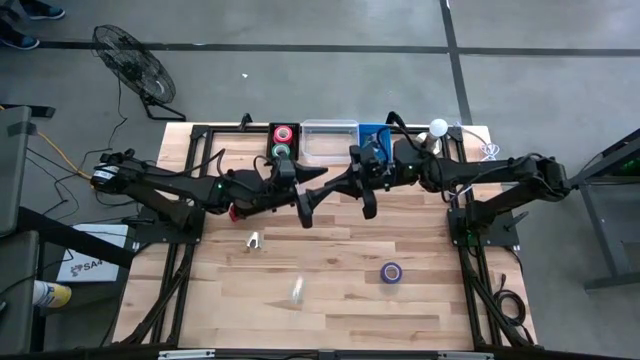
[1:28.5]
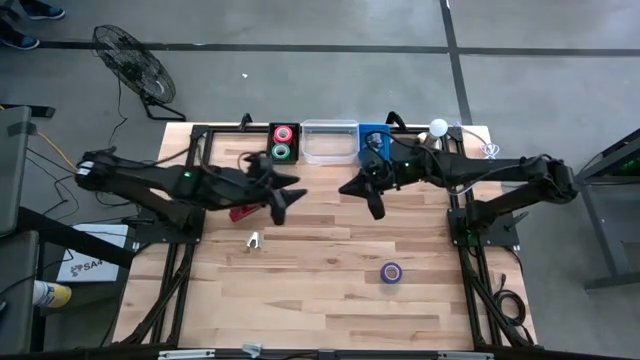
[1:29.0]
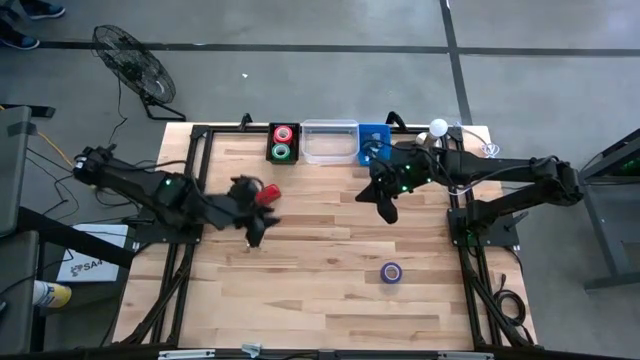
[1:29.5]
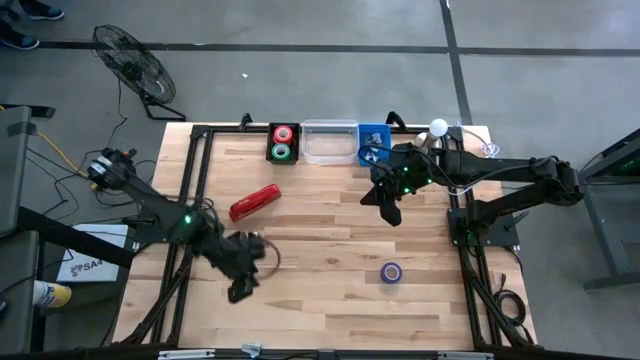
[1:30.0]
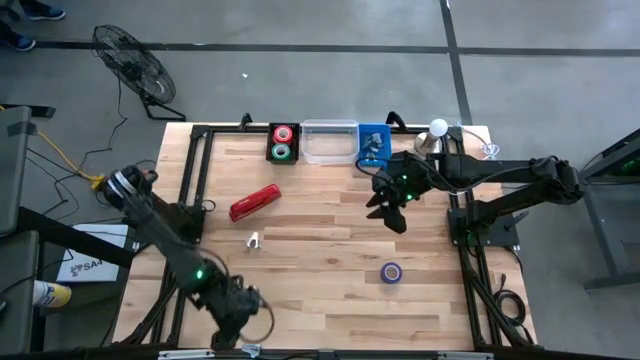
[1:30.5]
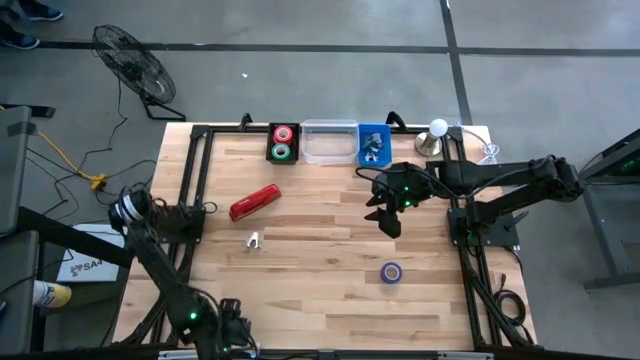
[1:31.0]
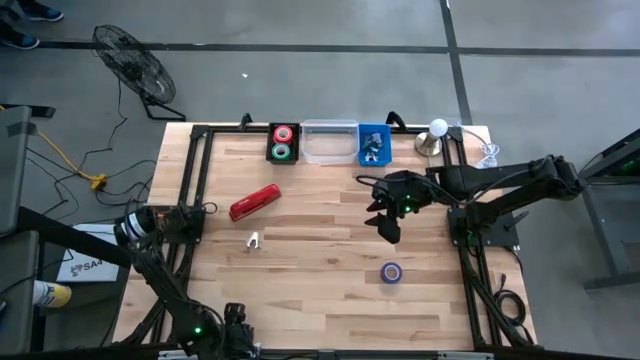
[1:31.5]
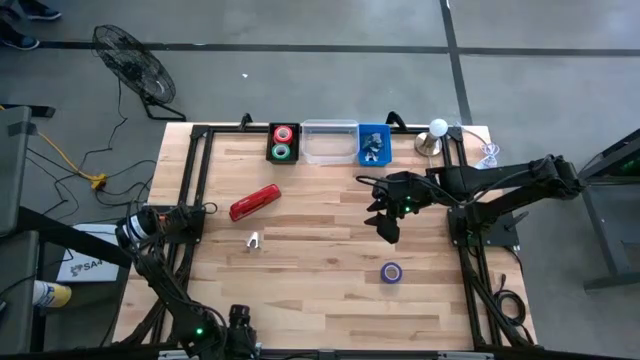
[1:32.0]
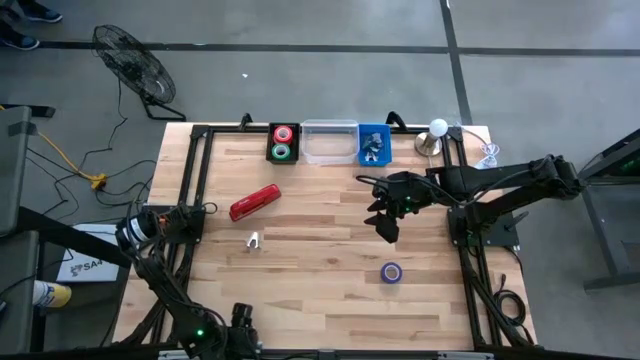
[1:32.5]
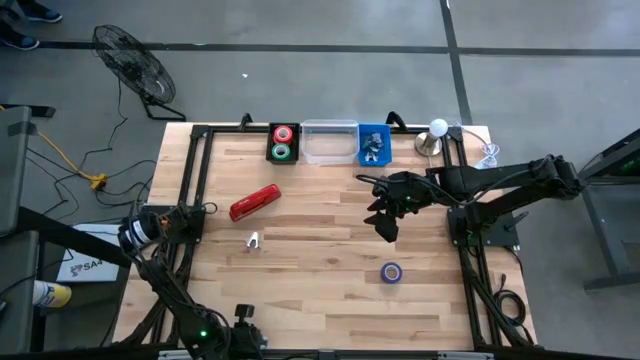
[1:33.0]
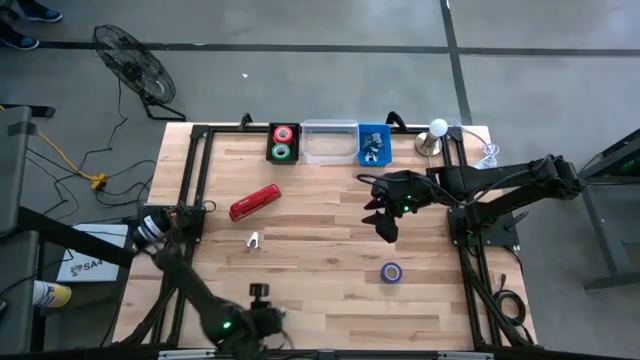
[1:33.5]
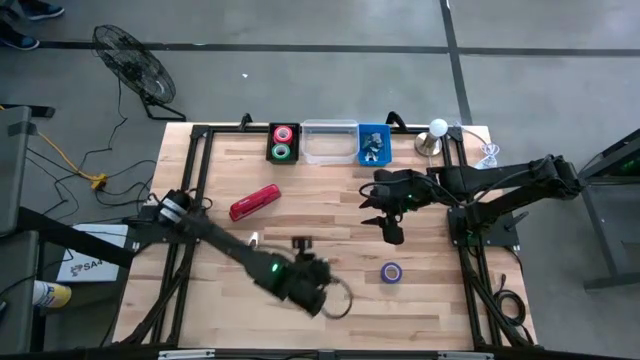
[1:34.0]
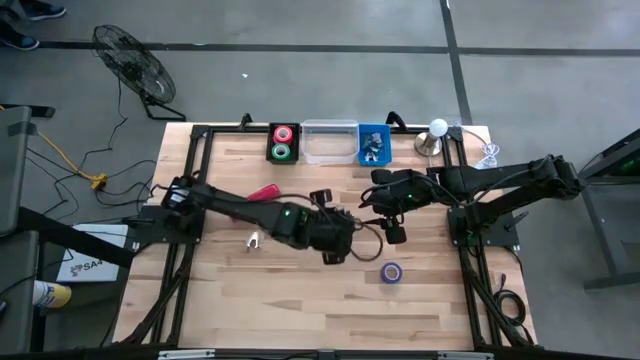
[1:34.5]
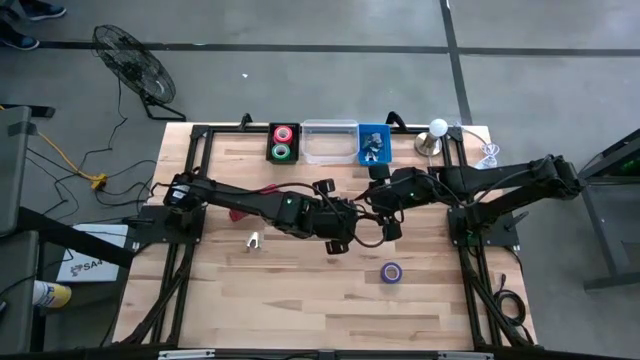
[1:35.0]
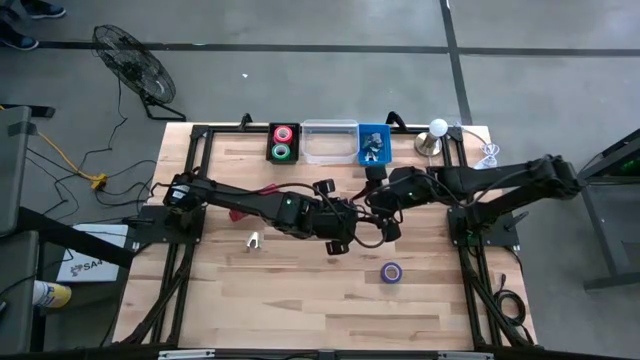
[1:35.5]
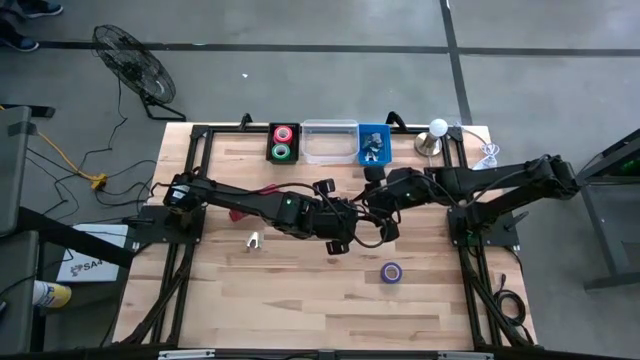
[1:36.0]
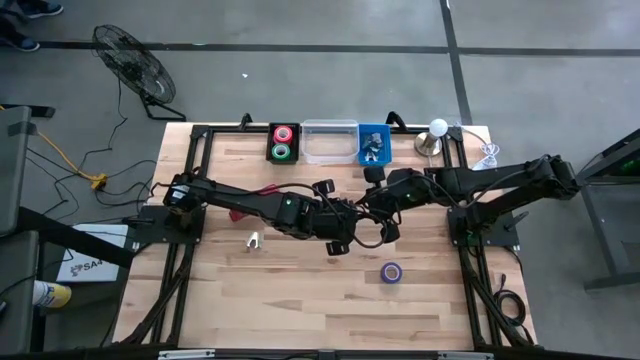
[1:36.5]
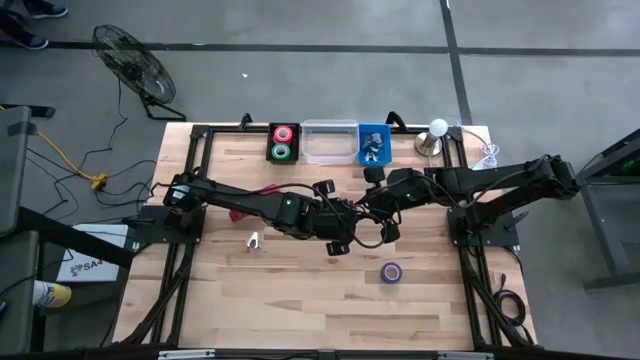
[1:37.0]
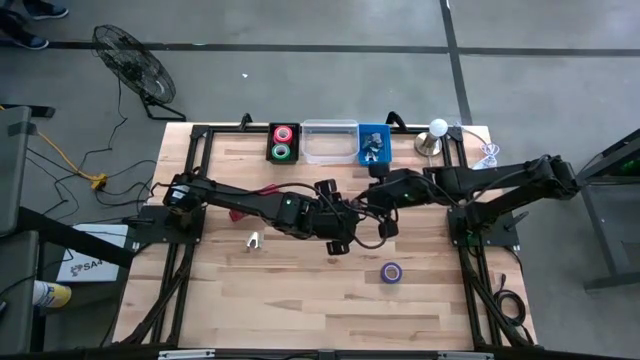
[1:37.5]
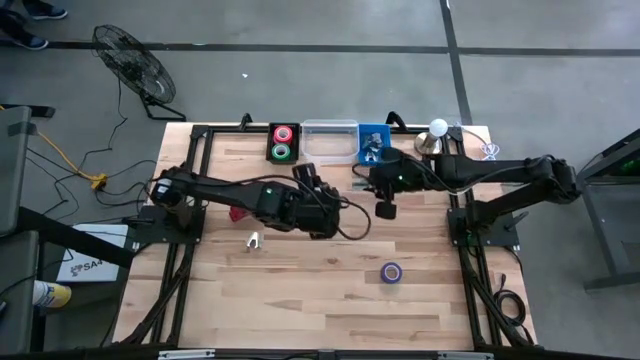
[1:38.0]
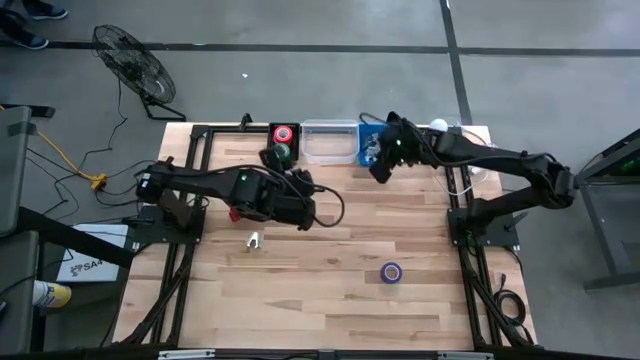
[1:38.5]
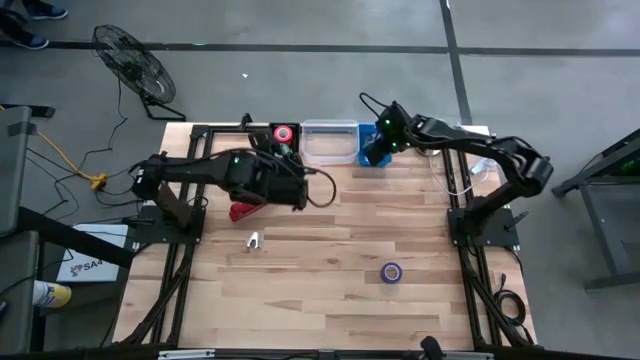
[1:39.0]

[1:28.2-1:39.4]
Task: Pick and place Stapler, Stapler remover, tape
Put the blue staple remover into the blue bin

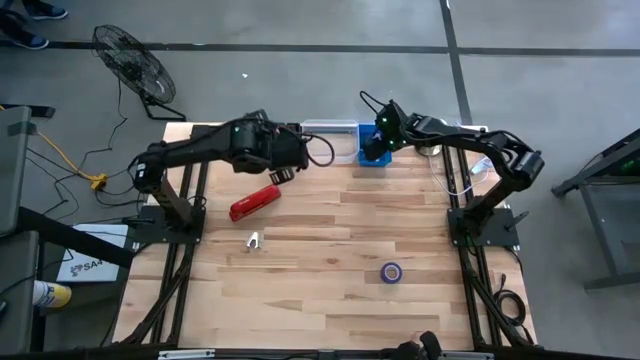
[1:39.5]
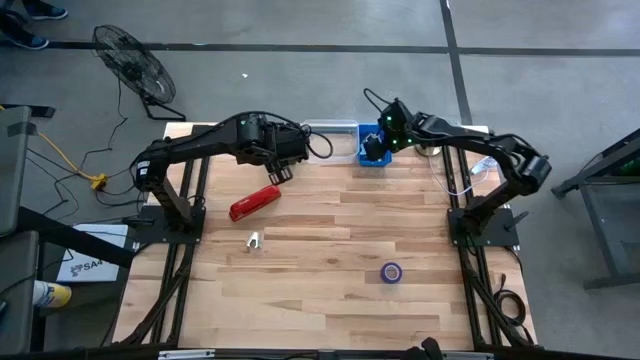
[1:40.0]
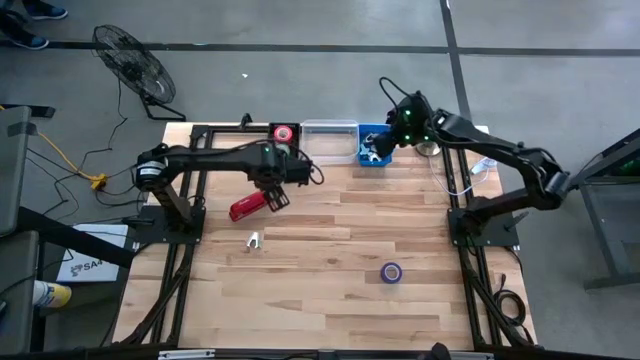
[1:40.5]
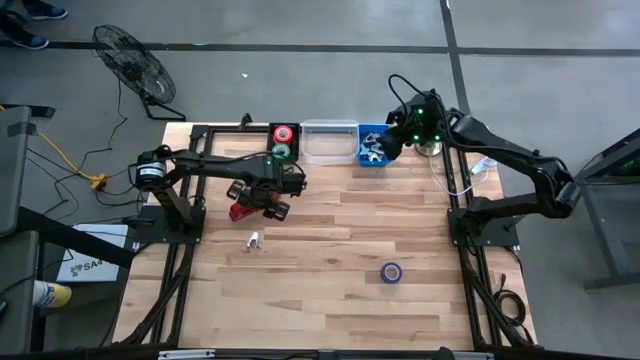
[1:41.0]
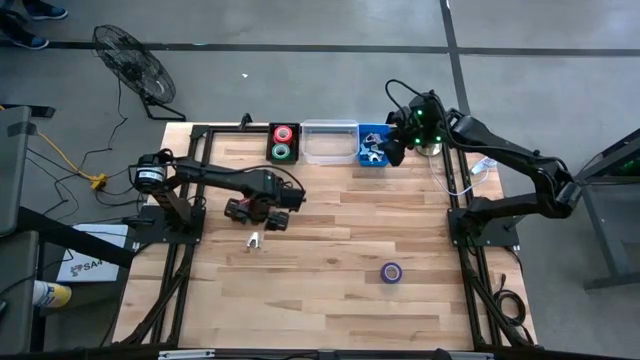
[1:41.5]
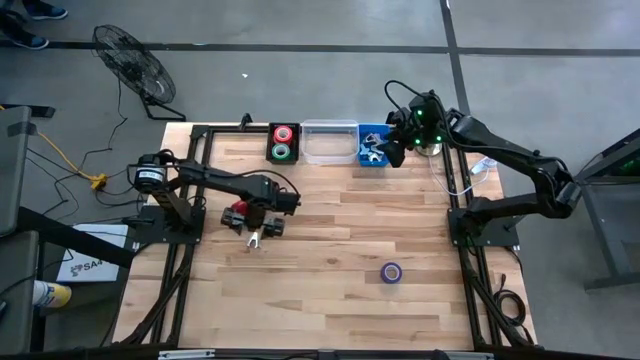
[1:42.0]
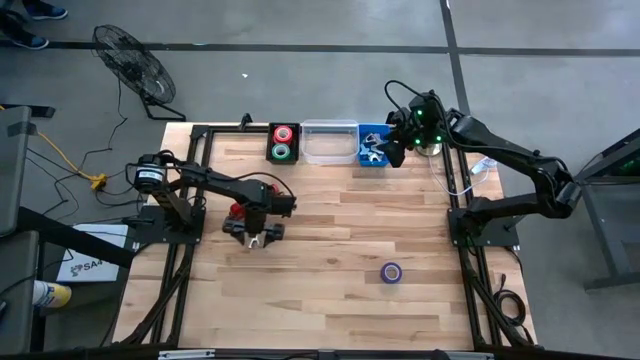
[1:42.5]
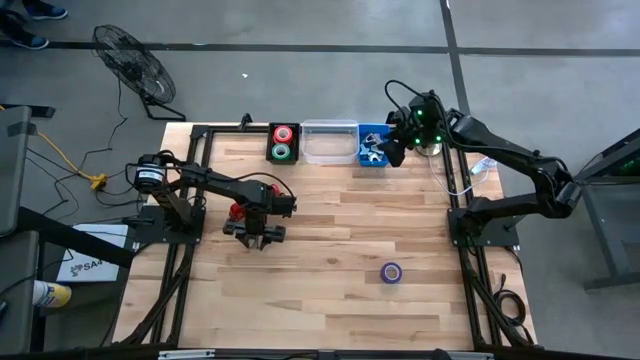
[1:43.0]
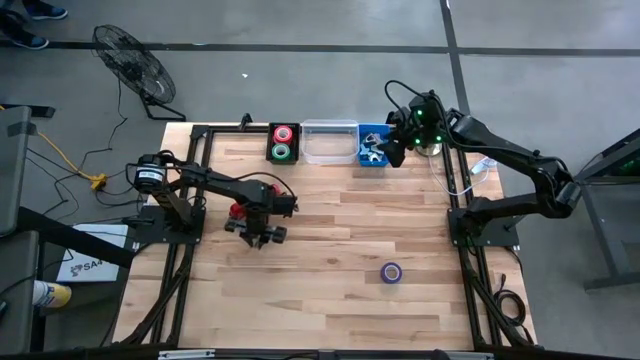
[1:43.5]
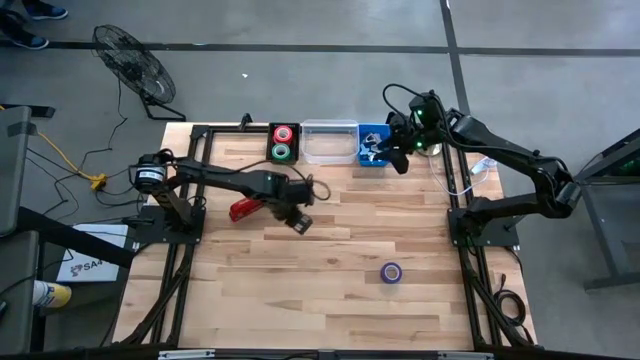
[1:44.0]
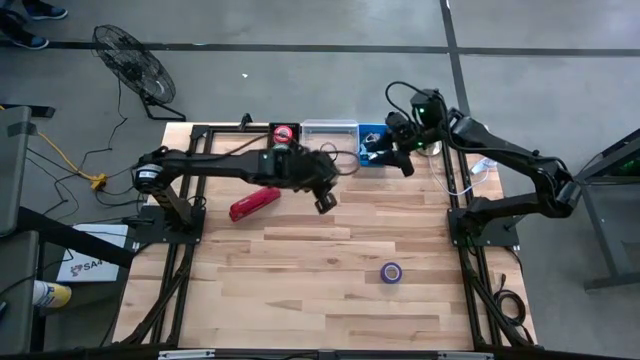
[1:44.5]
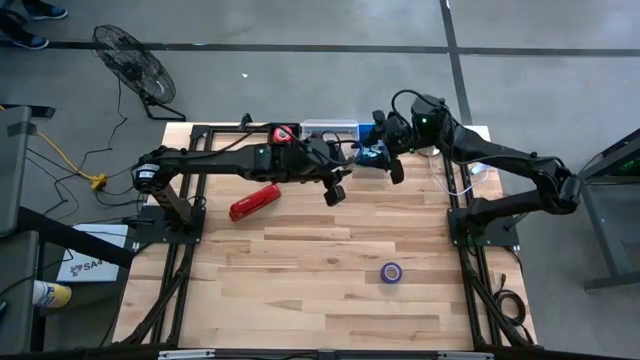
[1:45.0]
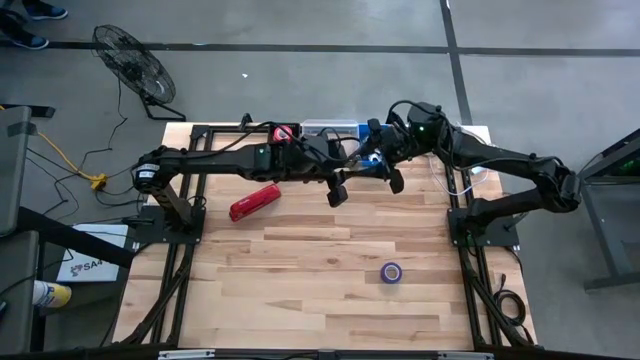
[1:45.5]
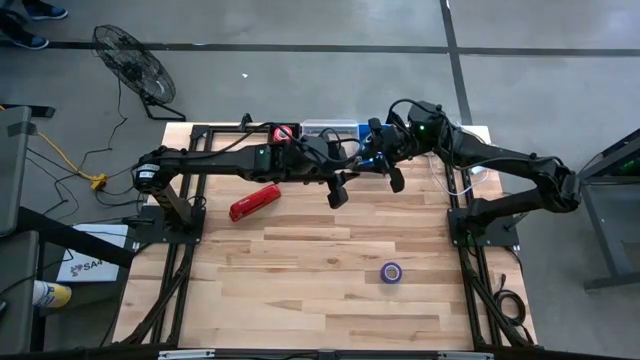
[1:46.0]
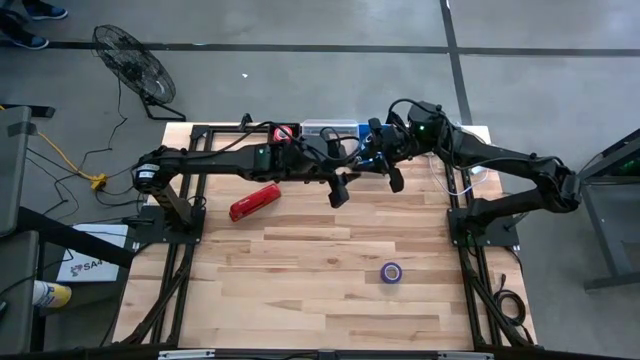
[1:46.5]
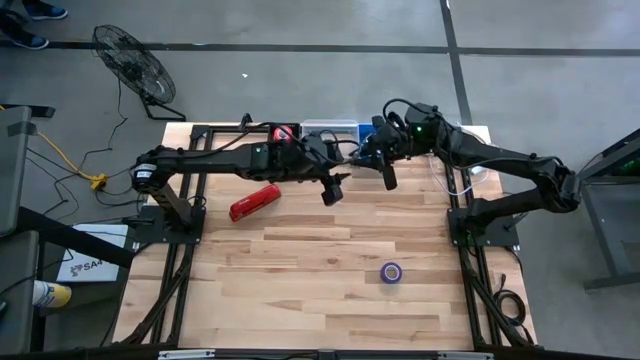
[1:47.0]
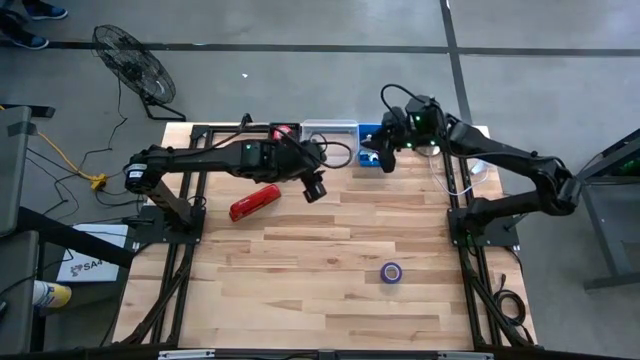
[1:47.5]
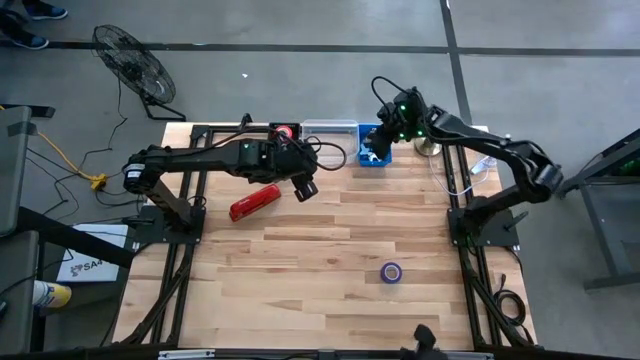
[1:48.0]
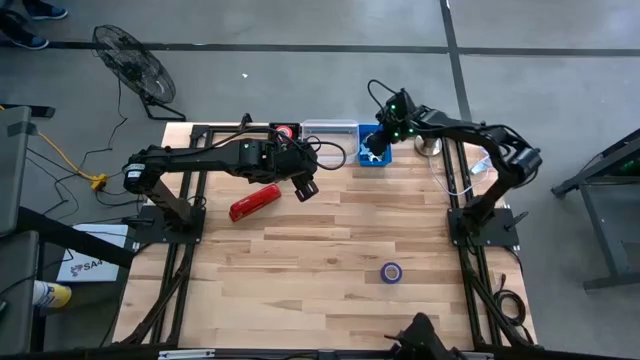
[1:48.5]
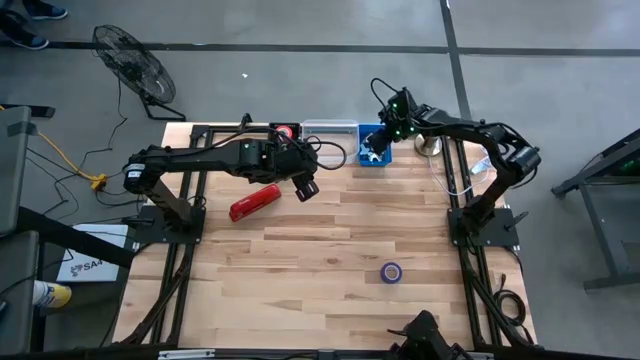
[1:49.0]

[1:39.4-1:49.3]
Put the gray staple remover into the blue bin
